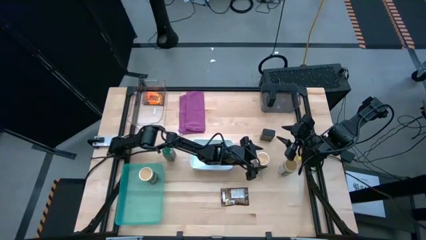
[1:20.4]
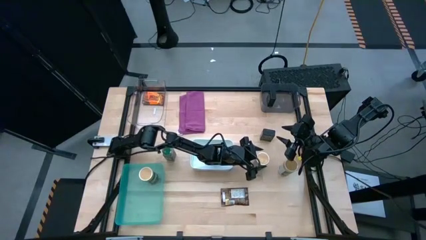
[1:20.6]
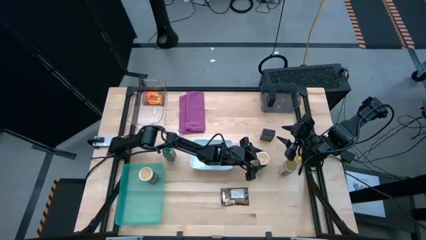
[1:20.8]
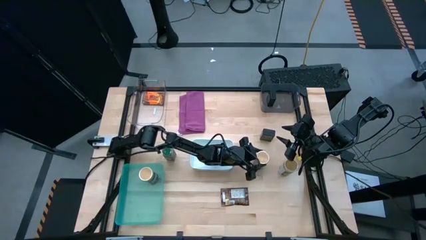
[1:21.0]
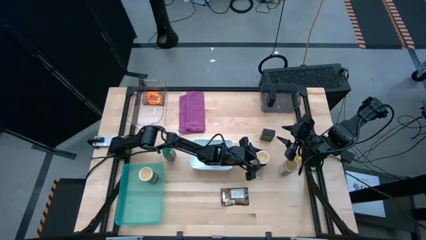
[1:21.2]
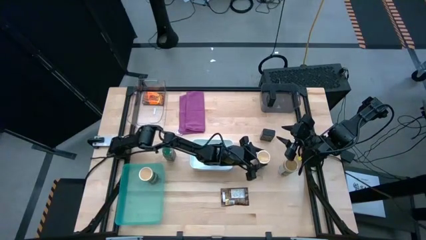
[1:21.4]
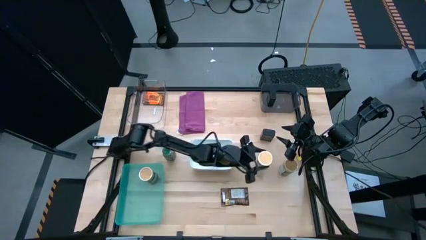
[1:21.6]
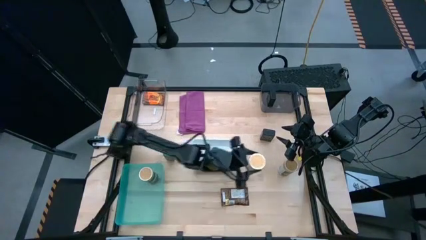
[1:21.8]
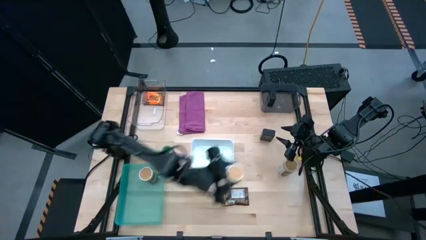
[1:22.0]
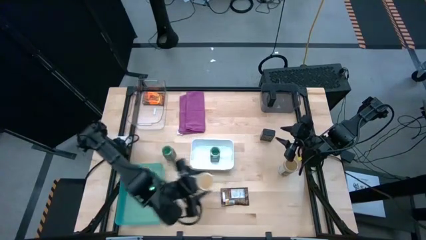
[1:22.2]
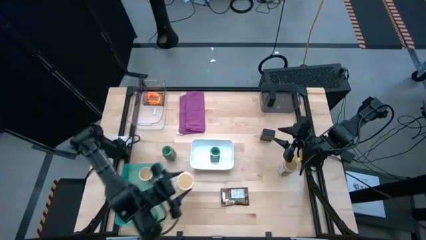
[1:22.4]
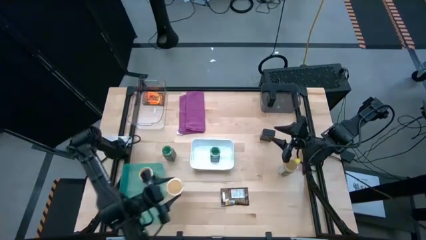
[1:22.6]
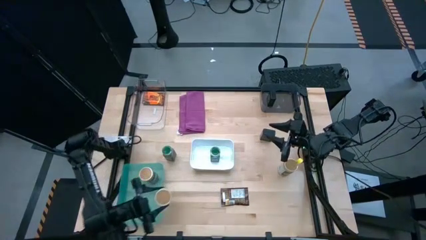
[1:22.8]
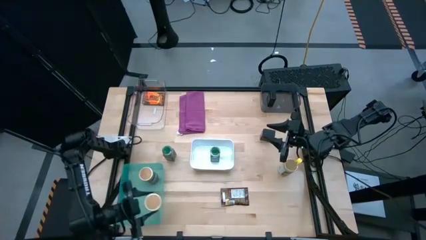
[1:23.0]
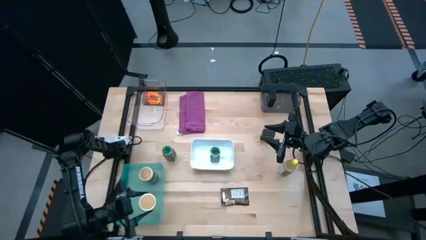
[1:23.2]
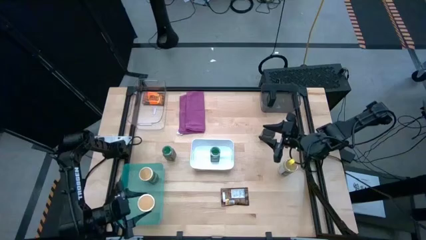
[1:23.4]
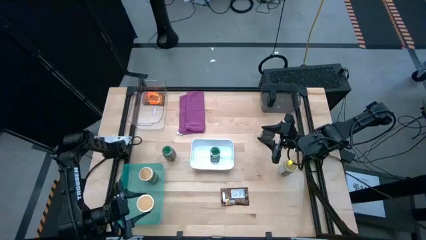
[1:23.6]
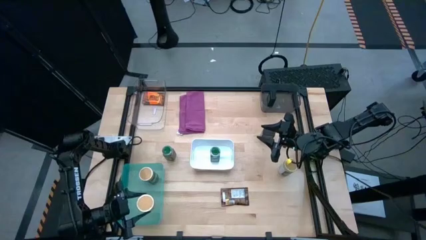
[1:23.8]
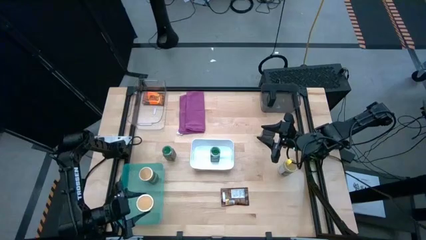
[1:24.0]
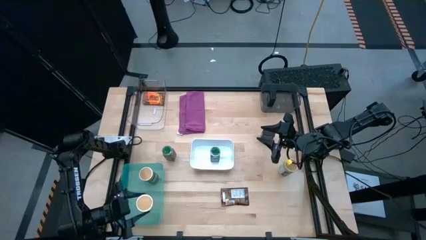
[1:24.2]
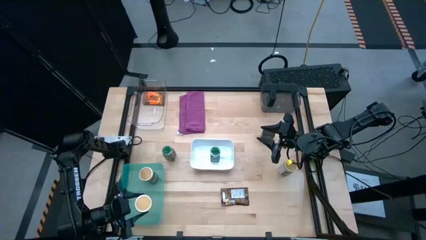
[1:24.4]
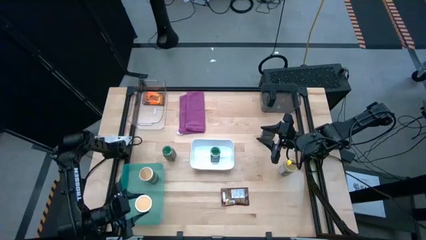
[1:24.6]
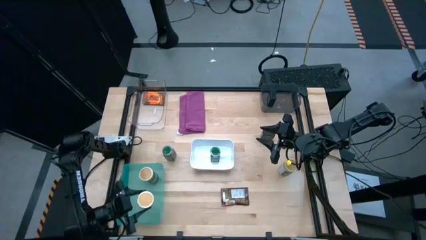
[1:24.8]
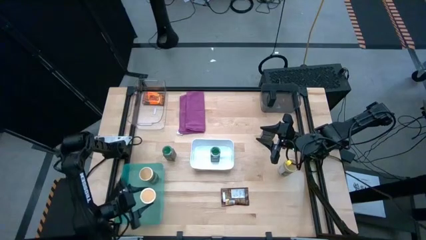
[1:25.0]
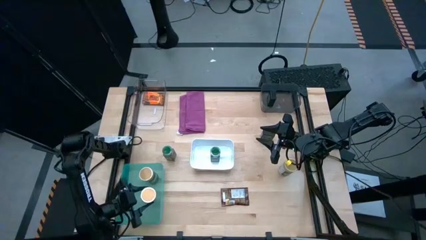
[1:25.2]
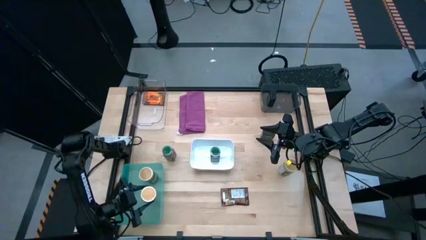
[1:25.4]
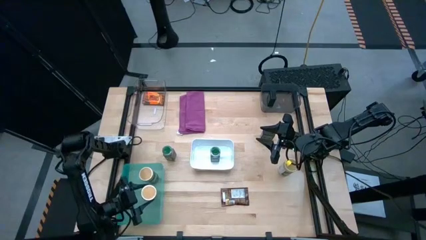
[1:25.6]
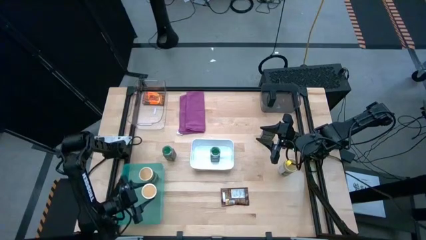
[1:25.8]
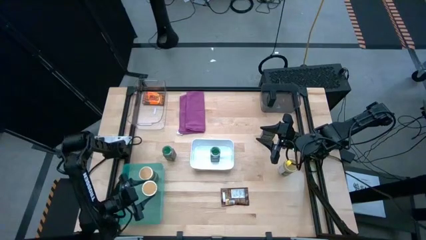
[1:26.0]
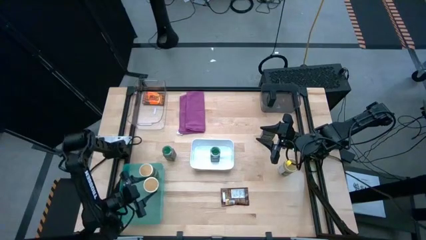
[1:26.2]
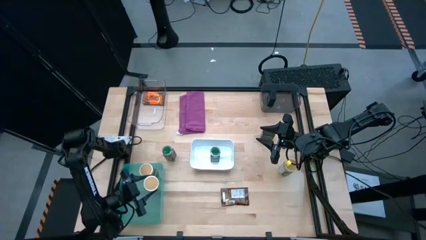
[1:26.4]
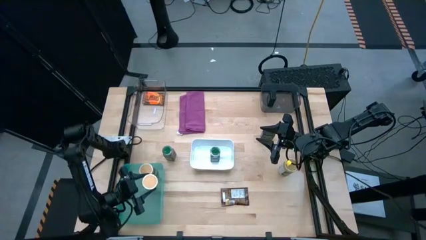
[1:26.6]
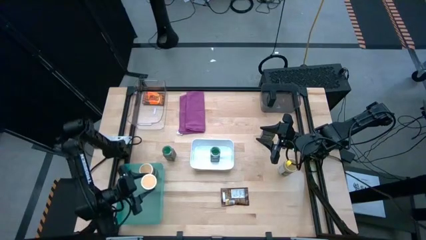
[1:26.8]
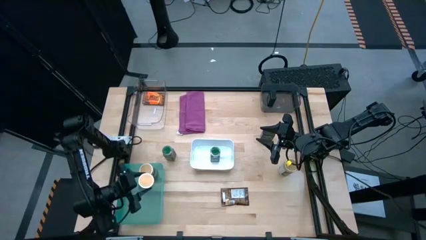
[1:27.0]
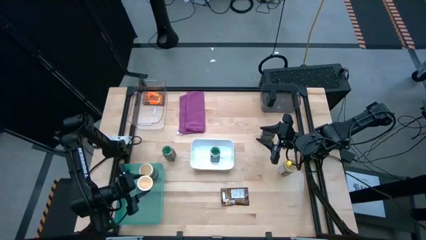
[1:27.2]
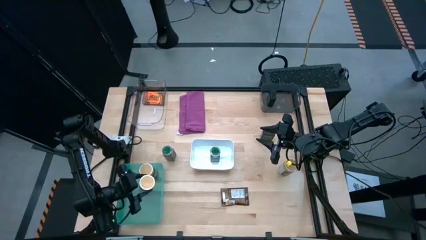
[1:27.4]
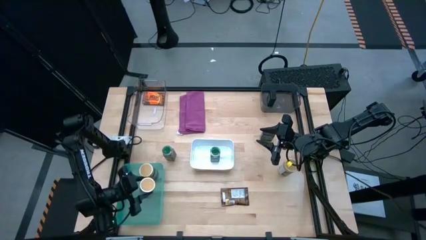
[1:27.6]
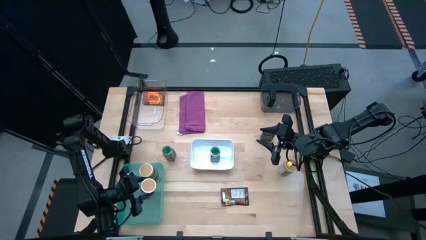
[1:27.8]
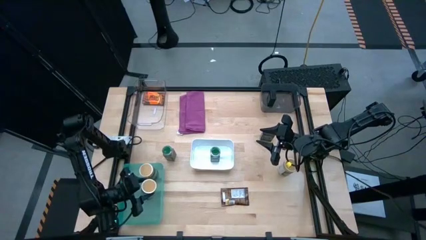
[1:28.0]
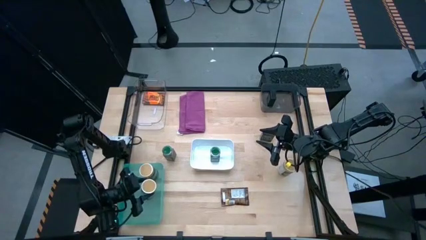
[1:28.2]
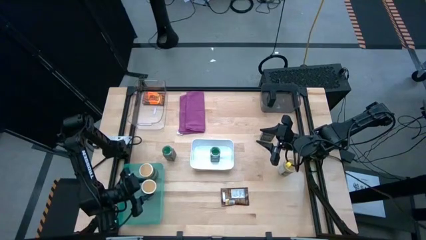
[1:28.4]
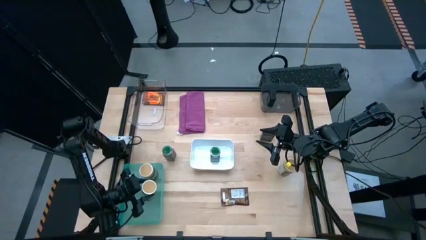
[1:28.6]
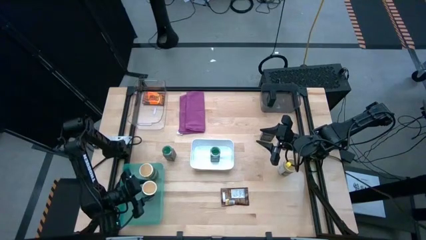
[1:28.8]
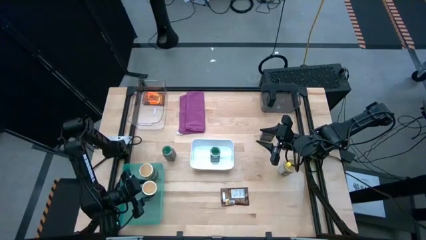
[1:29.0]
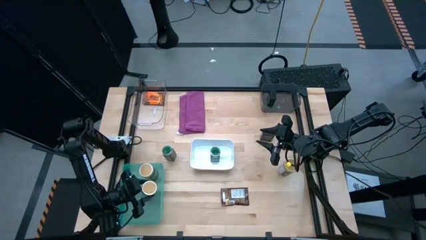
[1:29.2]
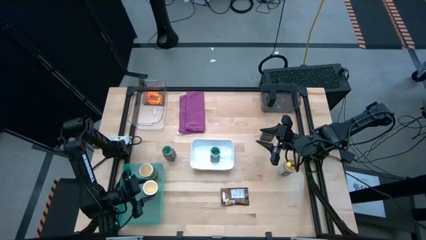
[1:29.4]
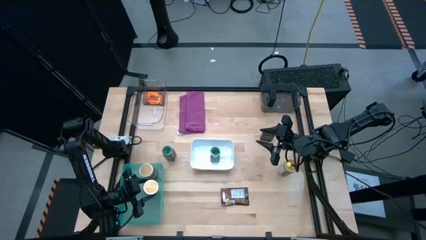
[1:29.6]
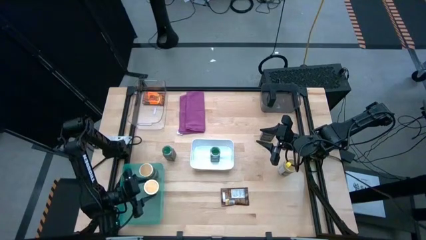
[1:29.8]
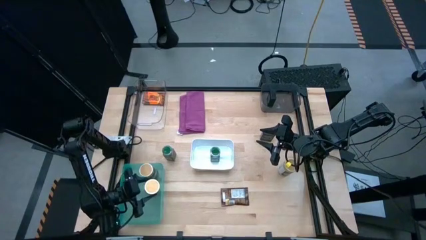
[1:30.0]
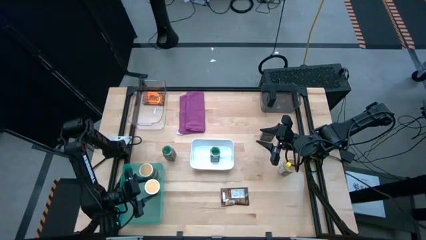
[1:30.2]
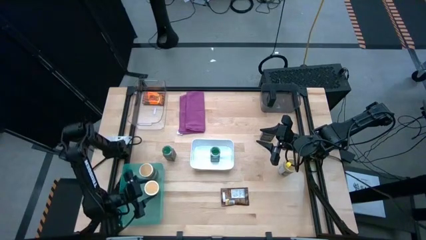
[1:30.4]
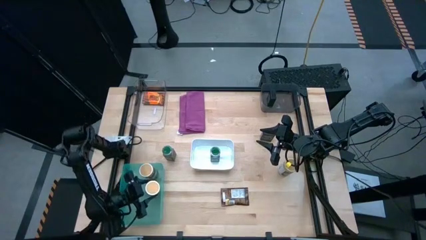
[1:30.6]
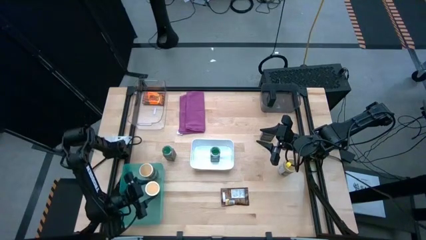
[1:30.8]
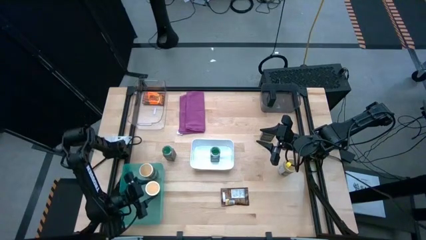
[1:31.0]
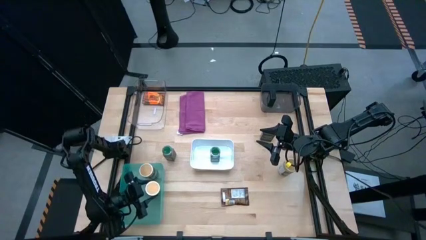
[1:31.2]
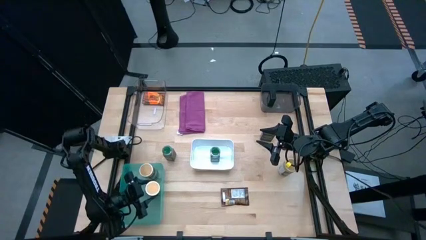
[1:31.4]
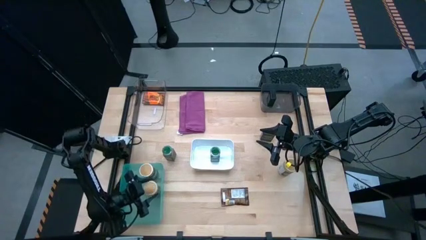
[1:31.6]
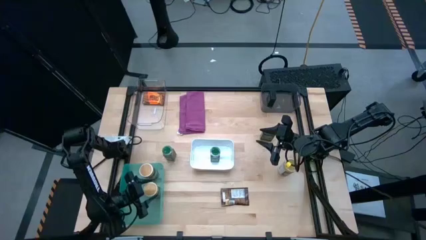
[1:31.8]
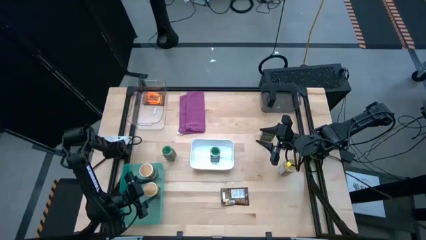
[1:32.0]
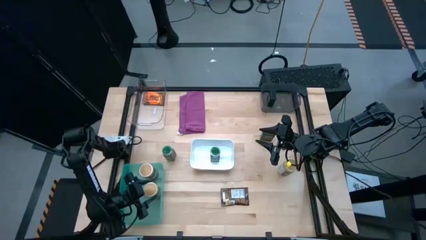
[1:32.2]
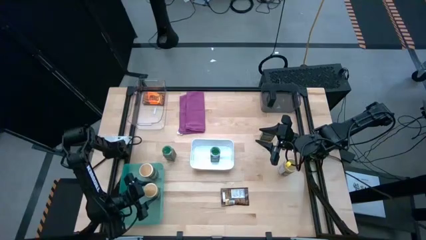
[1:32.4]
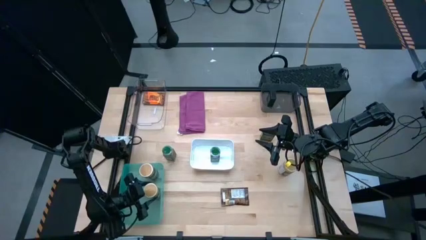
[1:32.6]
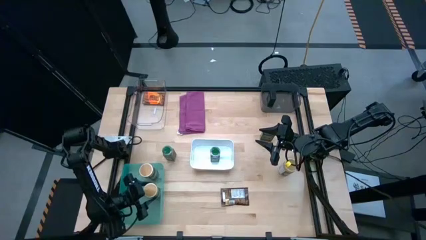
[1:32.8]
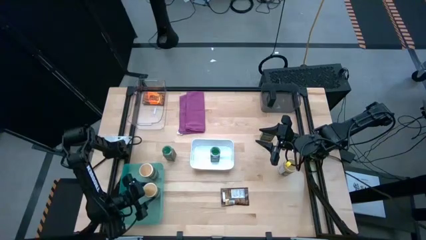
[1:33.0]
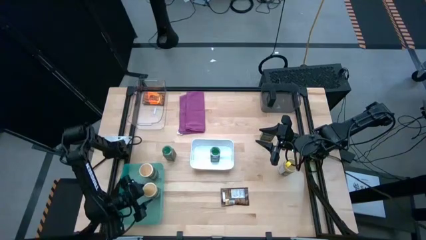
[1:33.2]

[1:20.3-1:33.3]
Task: Sort spices by type
Put the top brown seasoning bottle into the blue bin

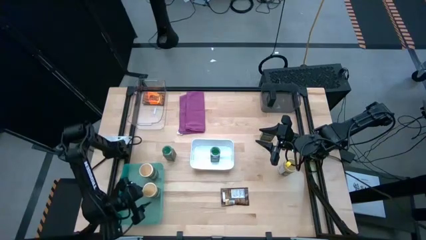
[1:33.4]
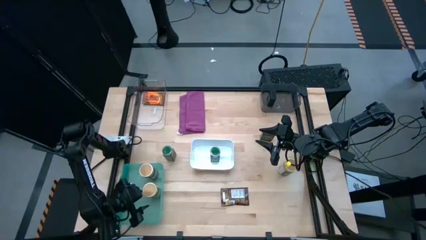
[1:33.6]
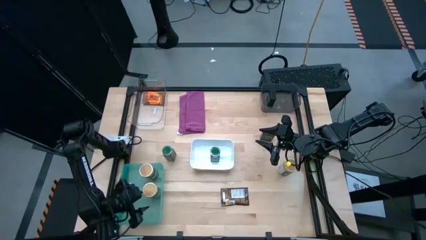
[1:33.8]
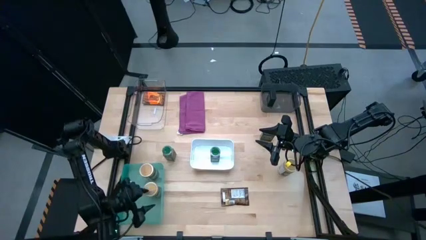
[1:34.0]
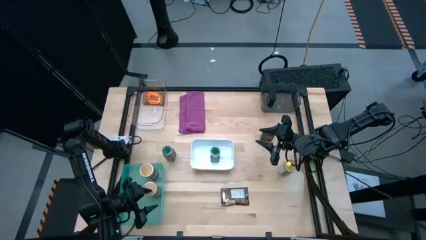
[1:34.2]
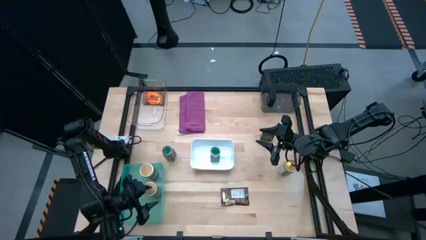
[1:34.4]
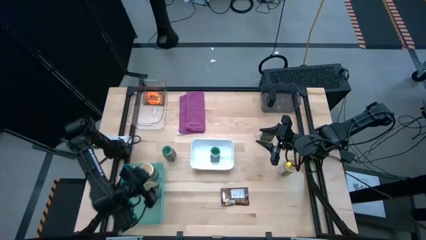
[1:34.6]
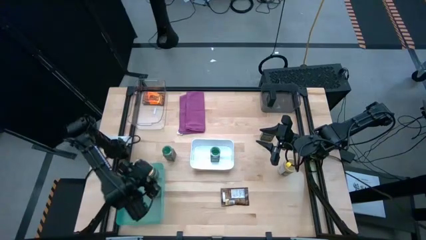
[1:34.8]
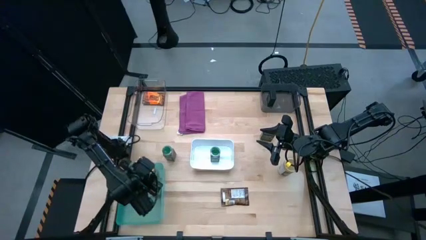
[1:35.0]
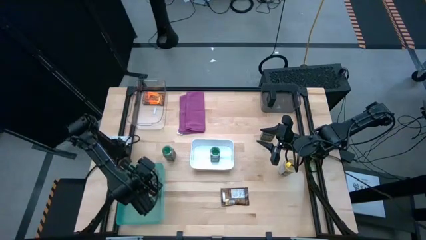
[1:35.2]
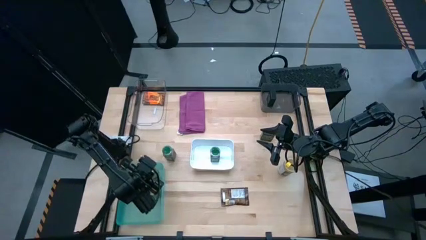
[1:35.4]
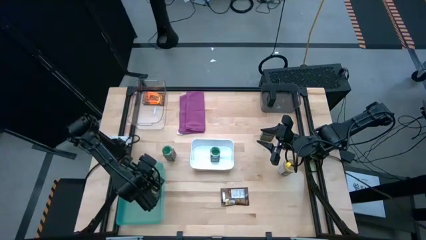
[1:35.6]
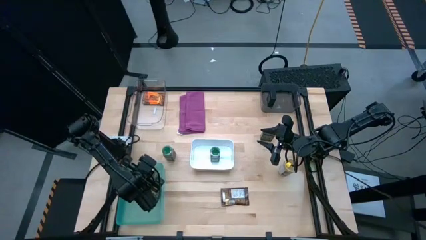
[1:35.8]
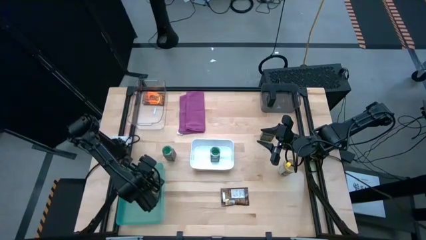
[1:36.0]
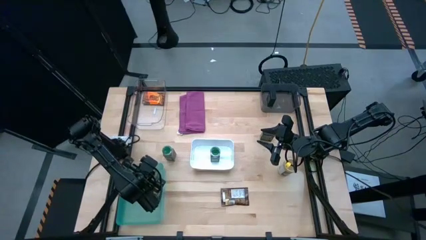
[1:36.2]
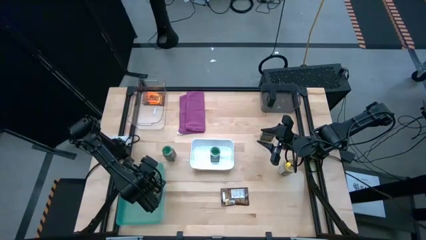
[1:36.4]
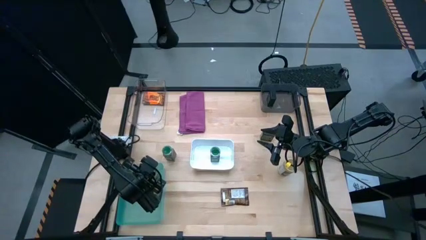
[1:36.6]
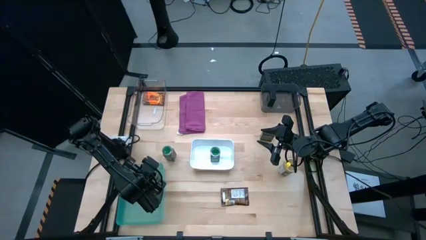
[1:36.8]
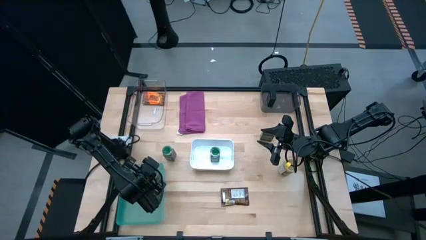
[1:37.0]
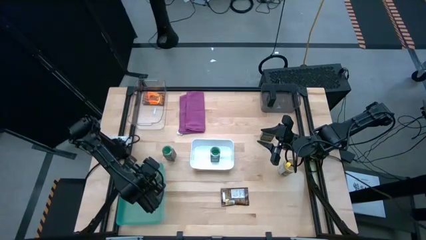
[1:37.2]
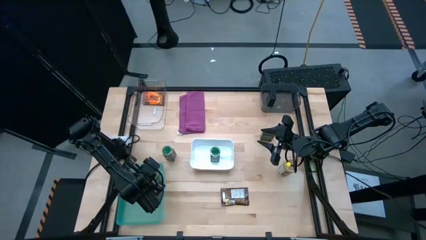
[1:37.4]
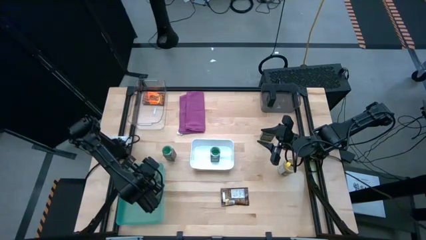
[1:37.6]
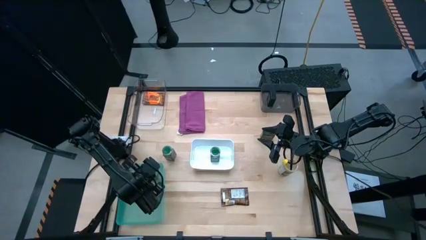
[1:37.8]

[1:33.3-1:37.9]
Adjust the brown seasoning bottle in the blue bin
